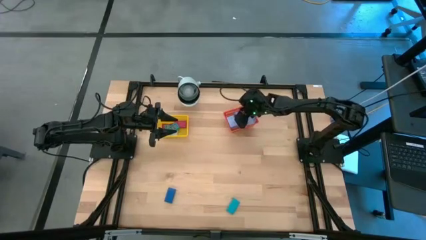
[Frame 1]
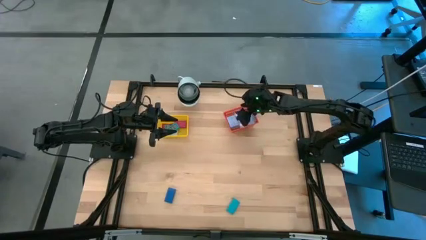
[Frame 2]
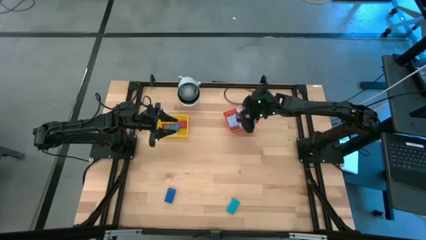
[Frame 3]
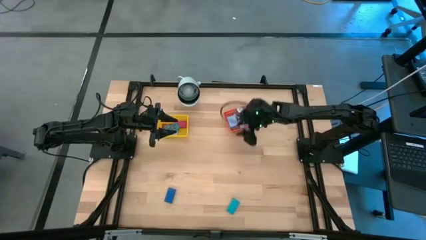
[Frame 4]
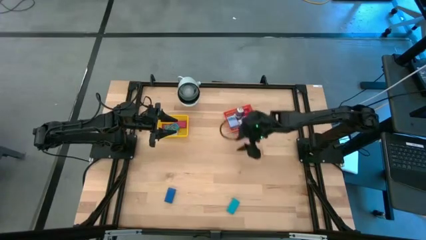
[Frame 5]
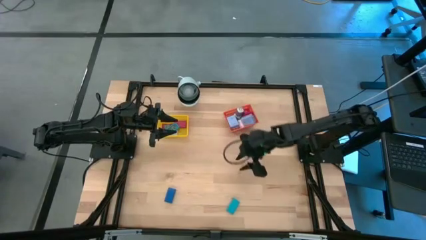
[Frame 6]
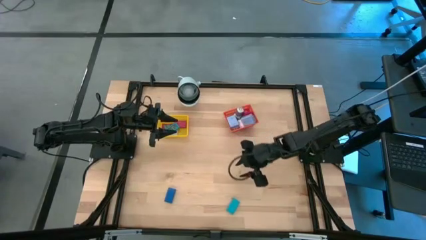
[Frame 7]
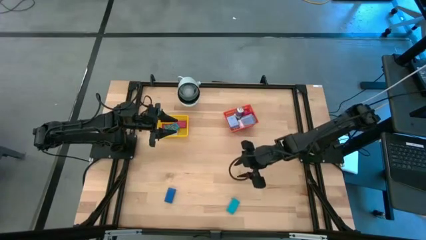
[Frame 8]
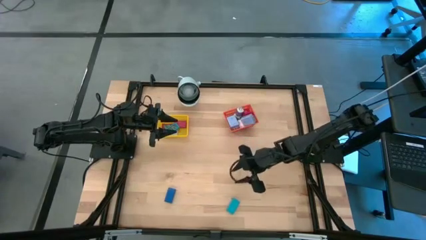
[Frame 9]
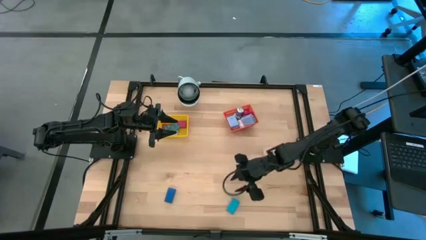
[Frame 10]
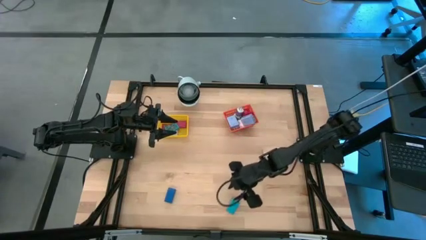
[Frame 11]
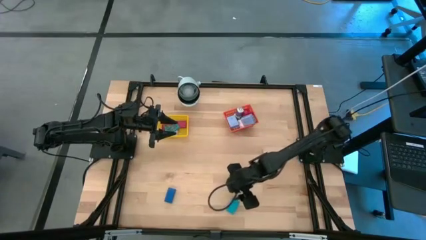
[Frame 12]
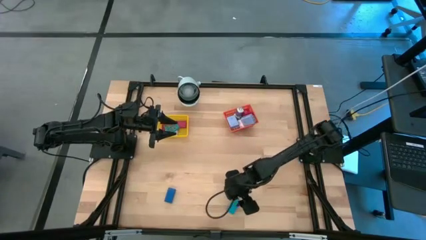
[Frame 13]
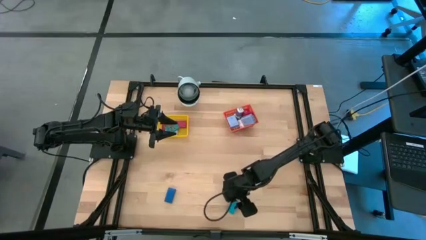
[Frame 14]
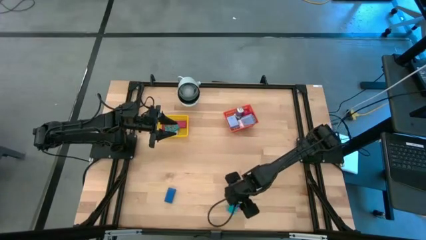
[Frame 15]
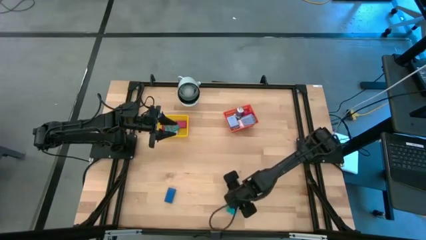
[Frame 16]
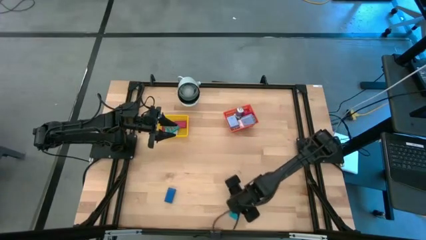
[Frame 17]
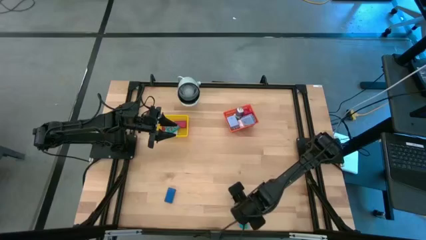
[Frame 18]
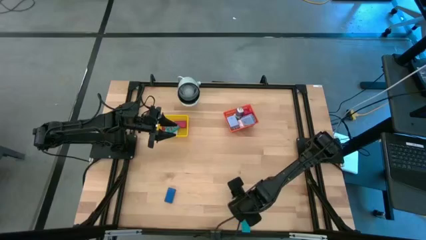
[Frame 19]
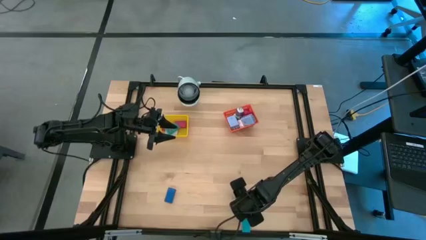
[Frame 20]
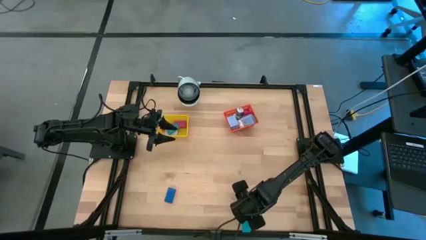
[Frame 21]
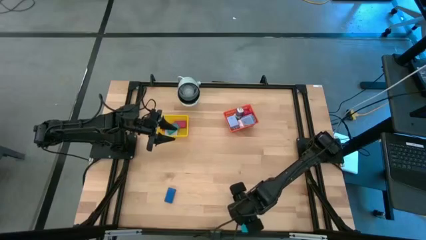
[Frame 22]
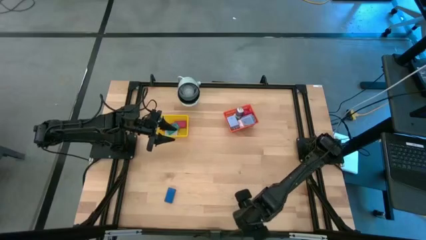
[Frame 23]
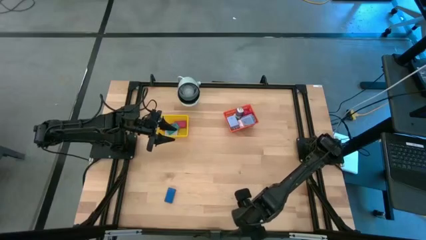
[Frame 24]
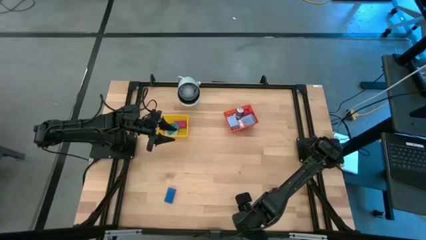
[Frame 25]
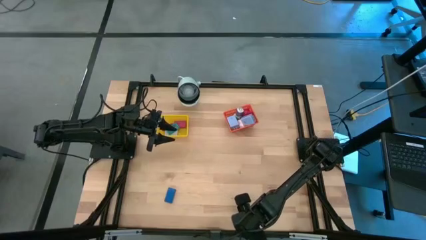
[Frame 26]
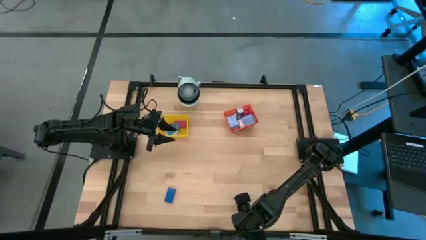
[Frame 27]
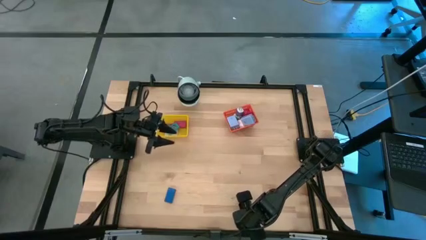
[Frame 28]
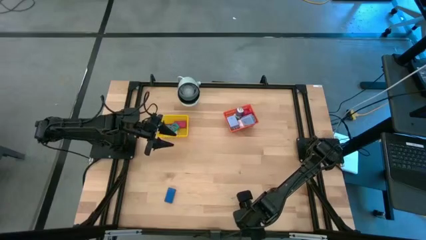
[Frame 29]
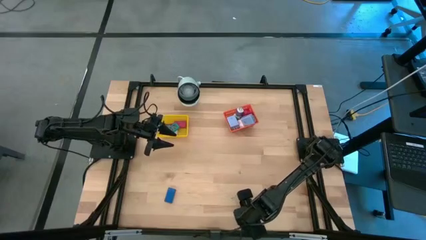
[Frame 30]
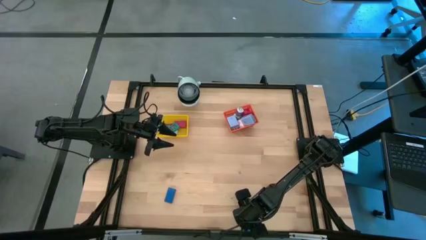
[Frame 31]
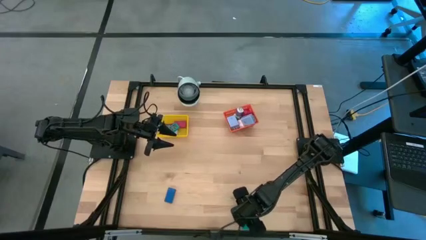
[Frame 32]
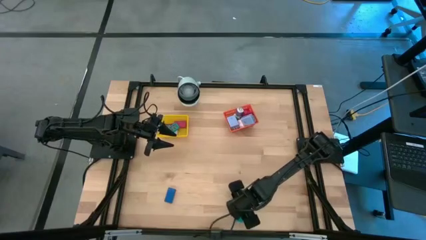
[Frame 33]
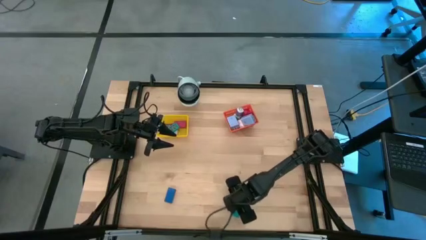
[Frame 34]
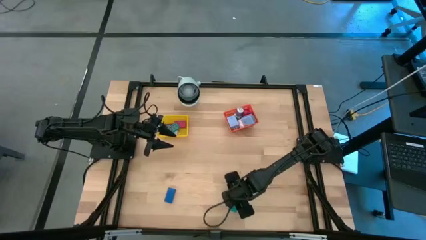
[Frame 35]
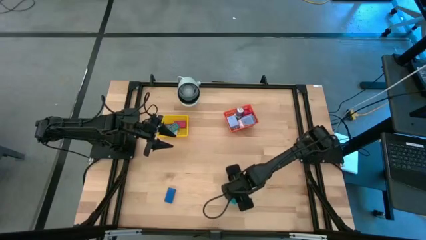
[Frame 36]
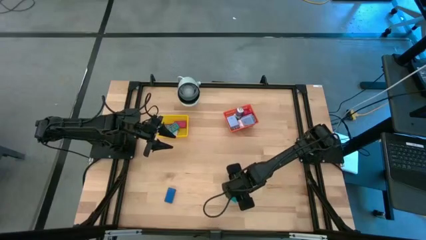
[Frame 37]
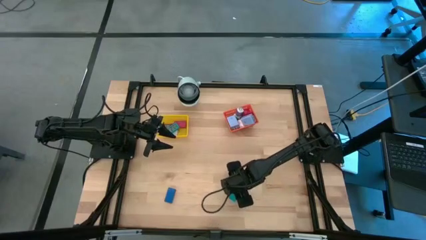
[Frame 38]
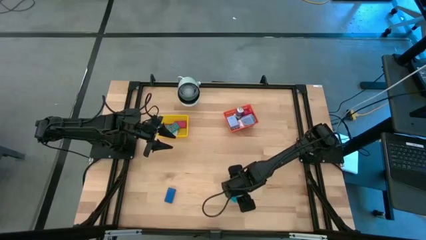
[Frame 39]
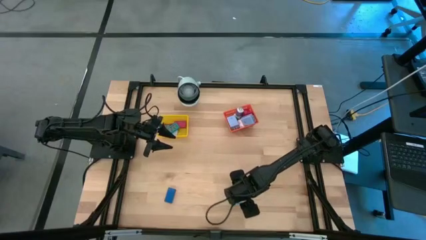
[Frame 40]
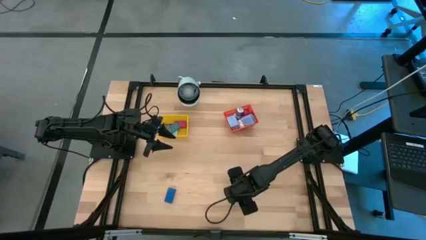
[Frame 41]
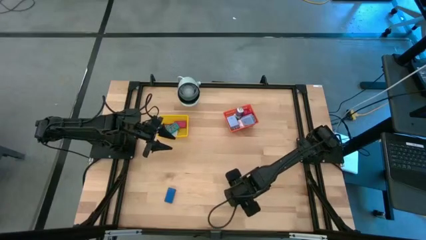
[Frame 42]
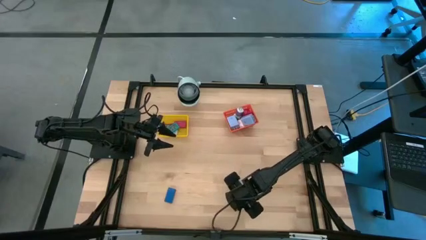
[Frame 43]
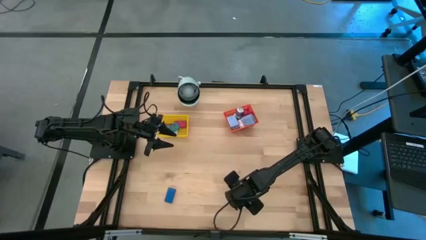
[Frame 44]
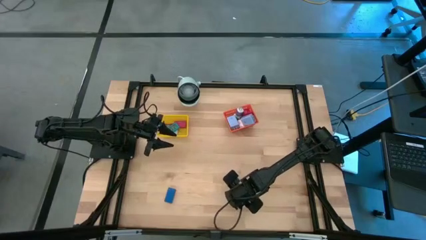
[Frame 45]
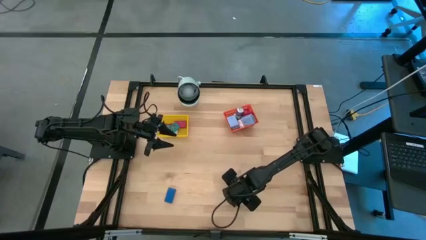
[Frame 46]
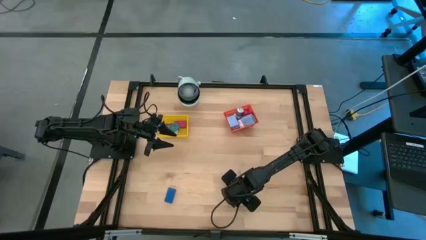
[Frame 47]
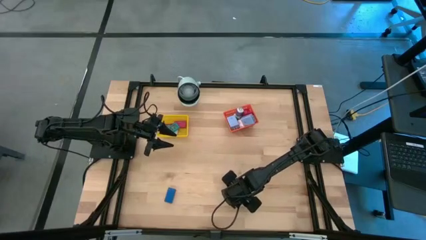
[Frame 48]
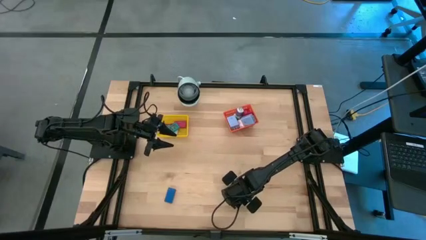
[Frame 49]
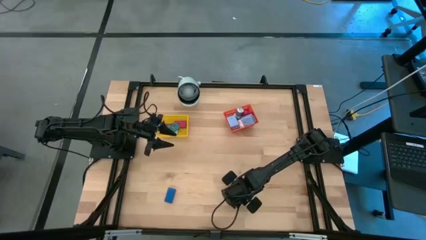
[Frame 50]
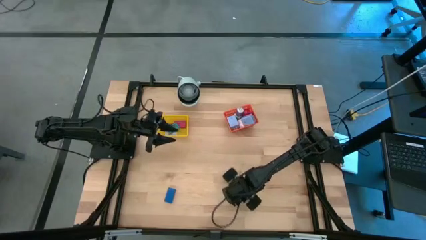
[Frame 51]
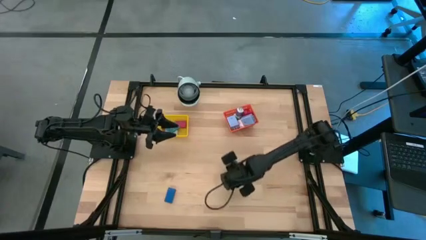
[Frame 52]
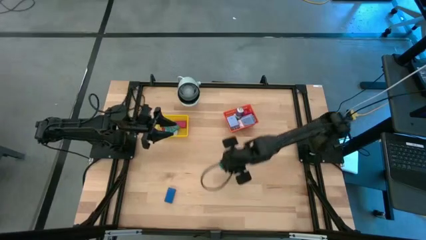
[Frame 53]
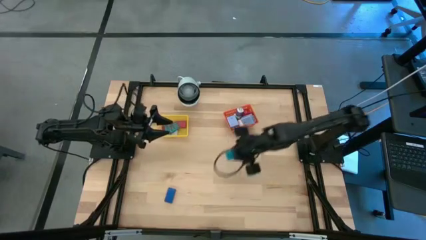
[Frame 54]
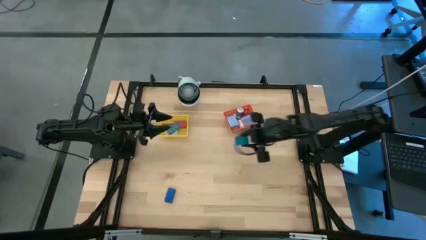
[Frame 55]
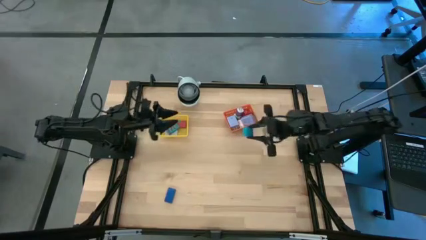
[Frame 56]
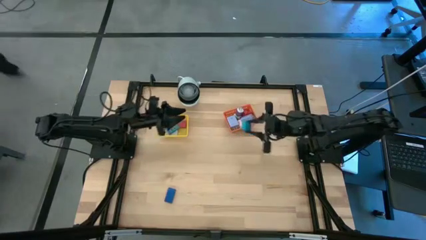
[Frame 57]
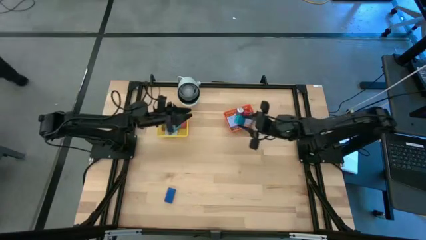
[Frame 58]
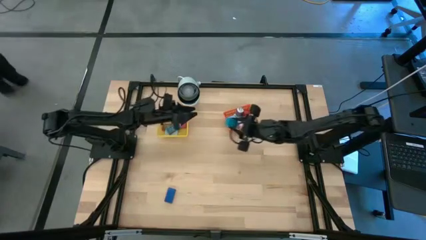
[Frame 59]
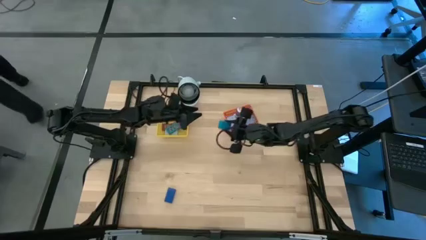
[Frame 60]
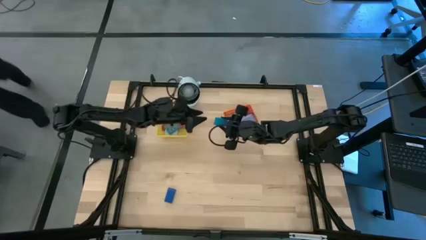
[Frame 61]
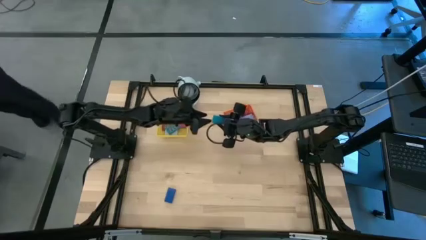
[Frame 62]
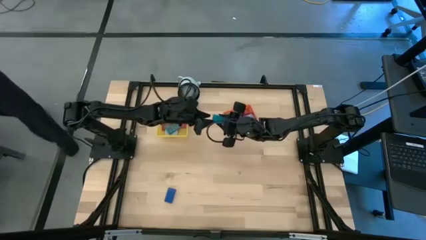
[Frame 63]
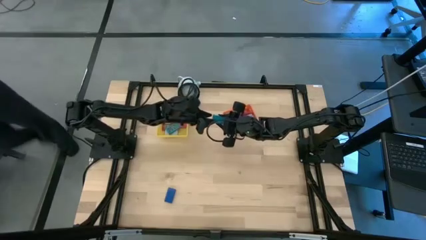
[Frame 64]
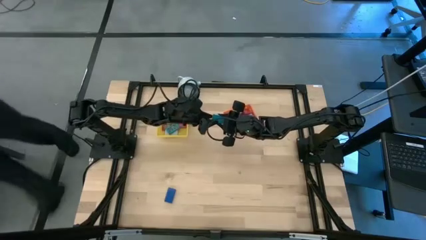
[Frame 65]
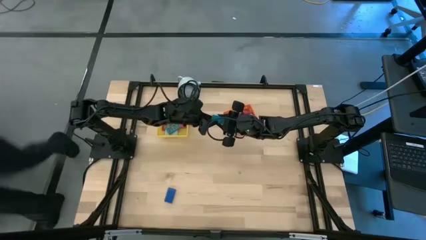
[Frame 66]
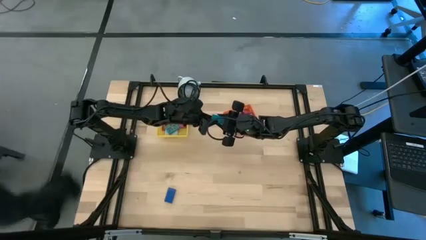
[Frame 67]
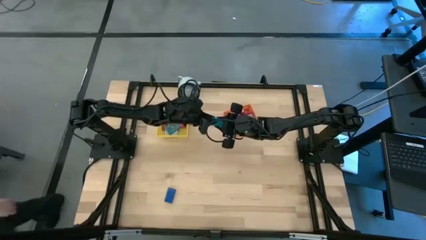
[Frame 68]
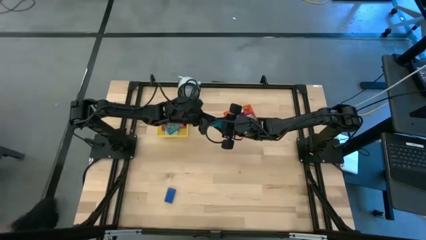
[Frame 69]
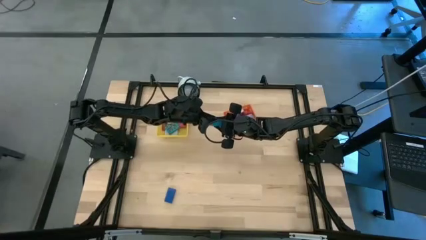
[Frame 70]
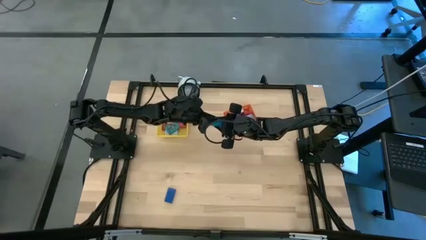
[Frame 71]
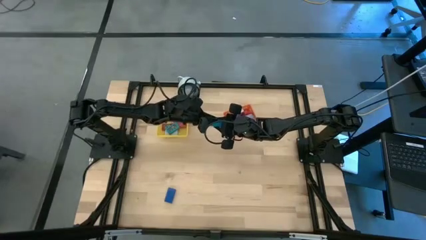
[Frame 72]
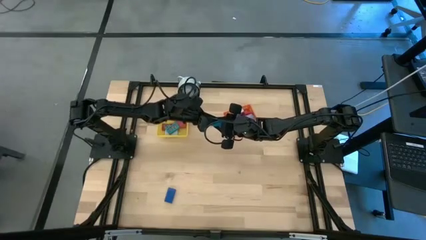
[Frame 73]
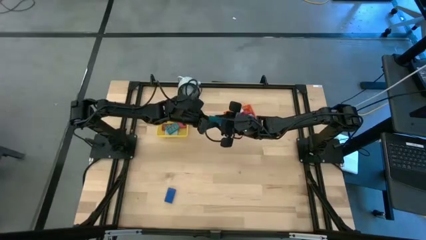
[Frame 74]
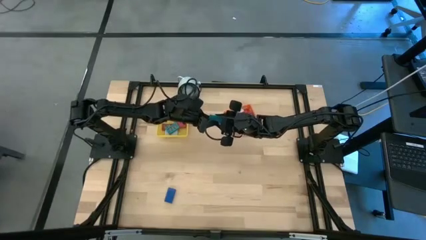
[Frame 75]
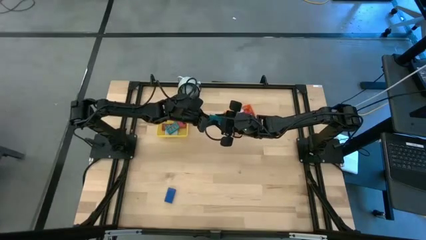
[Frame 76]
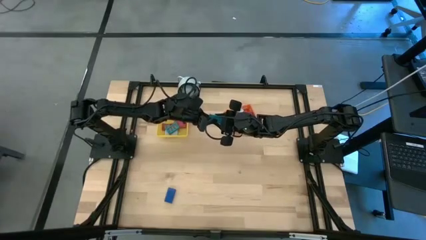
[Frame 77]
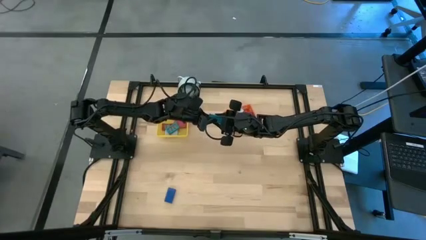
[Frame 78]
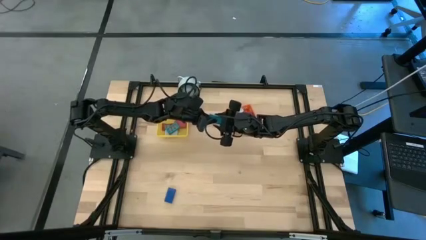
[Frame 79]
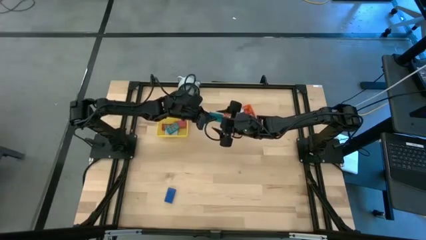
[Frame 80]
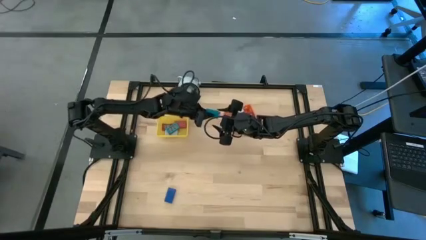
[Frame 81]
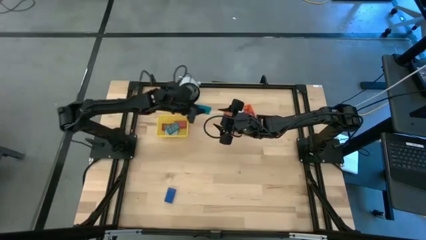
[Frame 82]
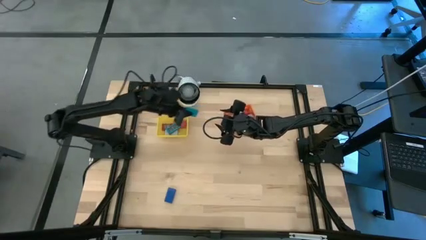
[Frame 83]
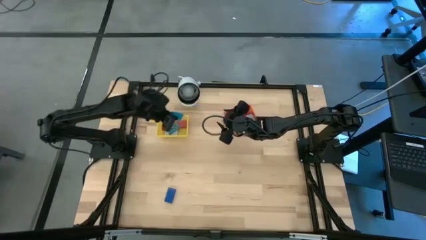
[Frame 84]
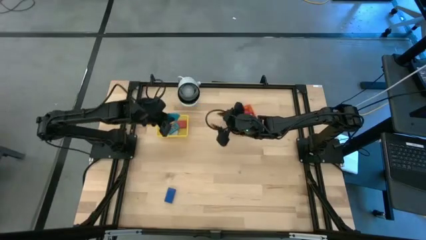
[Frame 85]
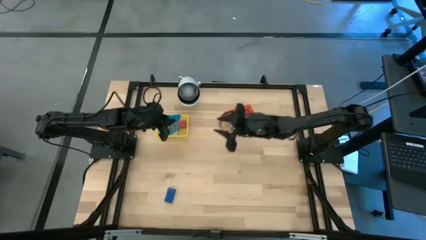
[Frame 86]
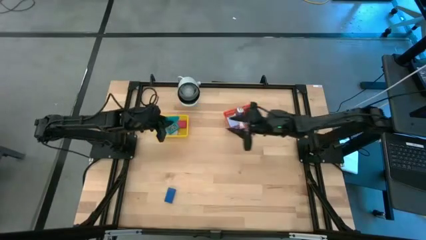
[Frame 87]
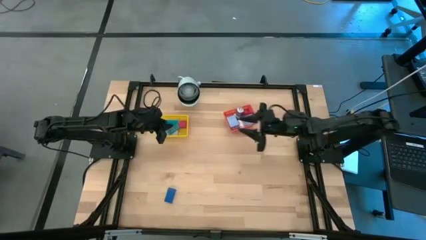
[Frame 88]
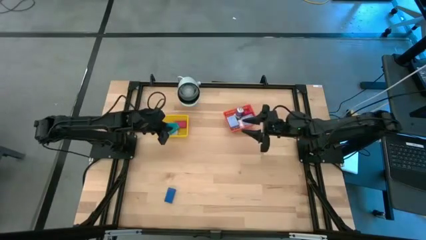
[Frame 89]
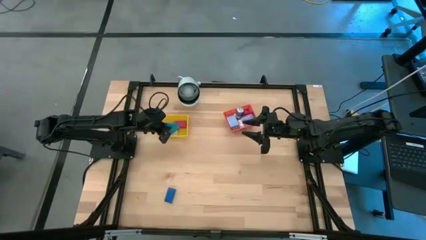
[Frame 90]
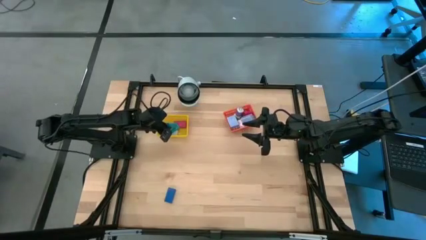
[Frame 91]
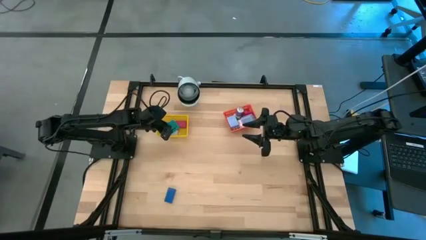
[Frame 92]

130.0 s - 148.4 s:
Task: Pick & Place Office items
Put the light blue digital timer into the yellow bin
